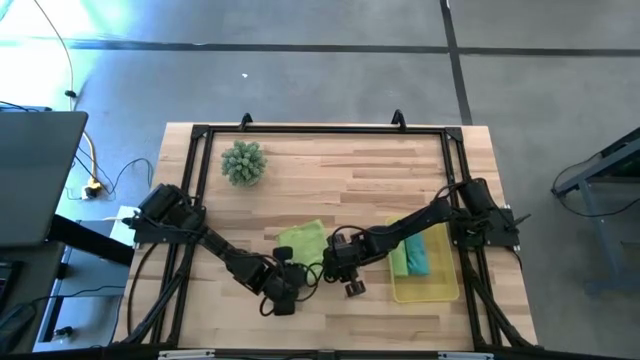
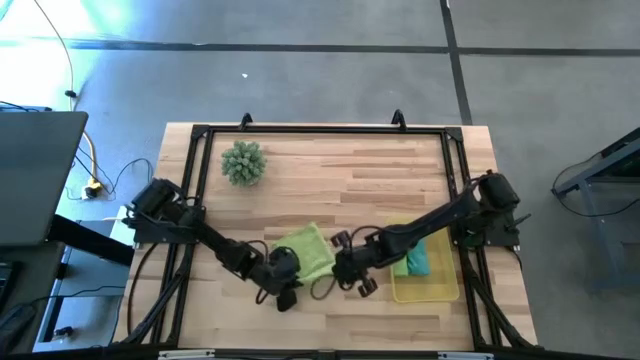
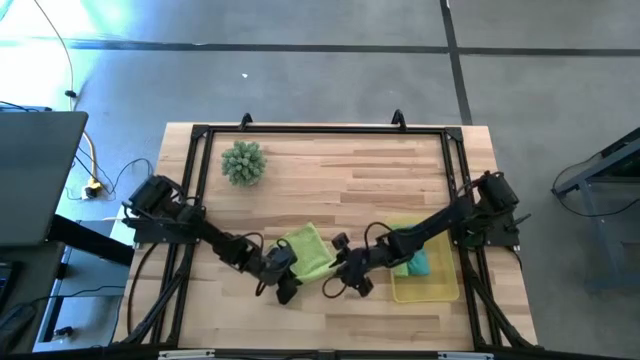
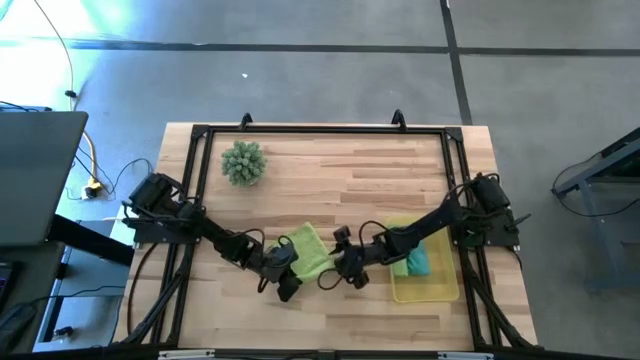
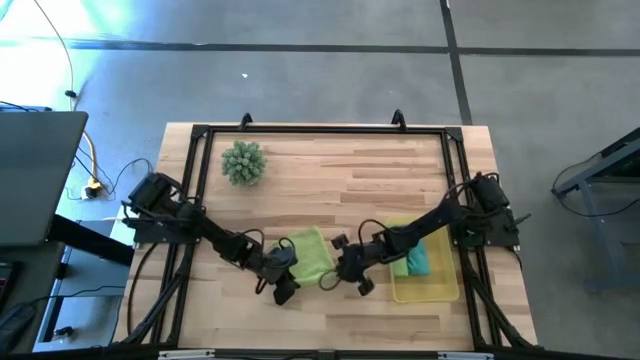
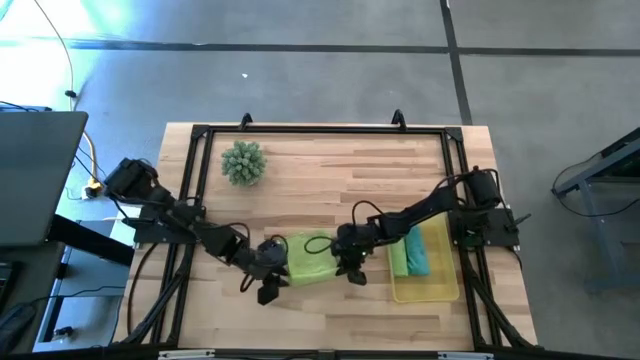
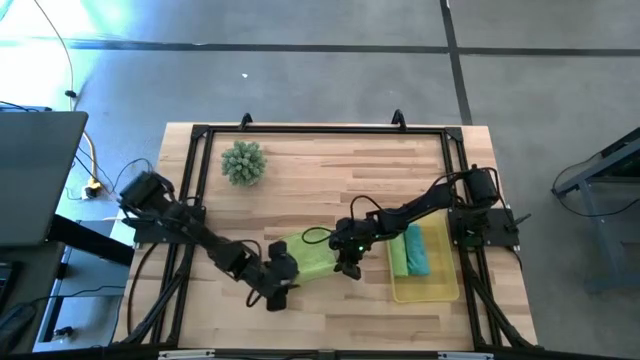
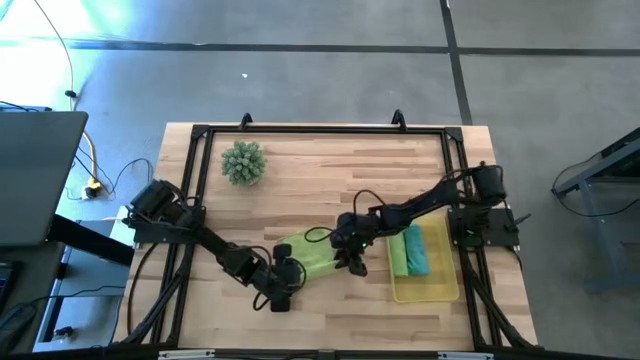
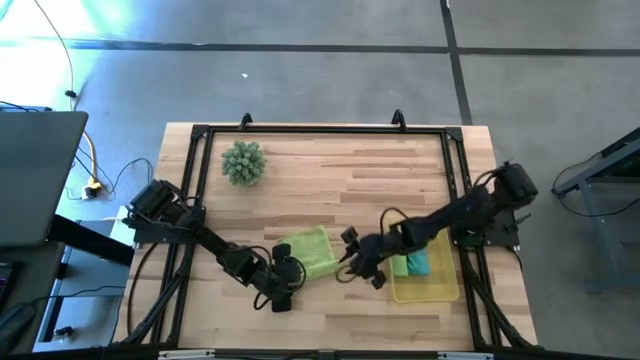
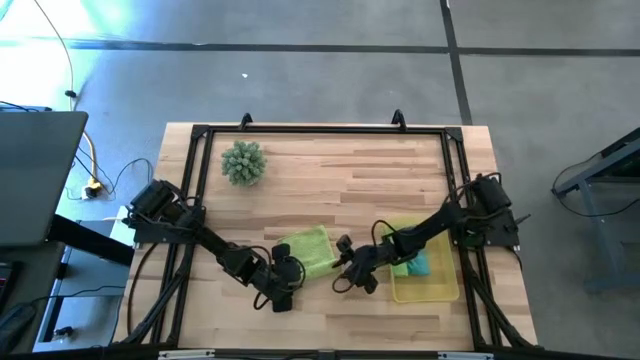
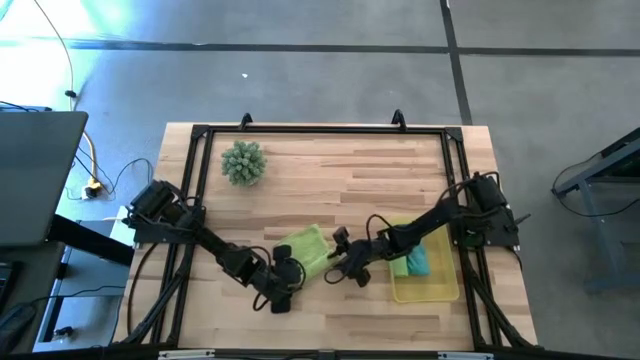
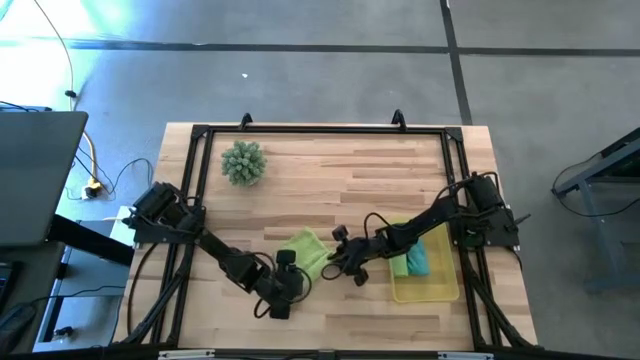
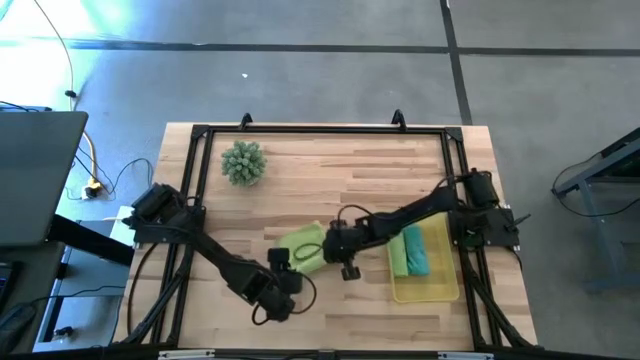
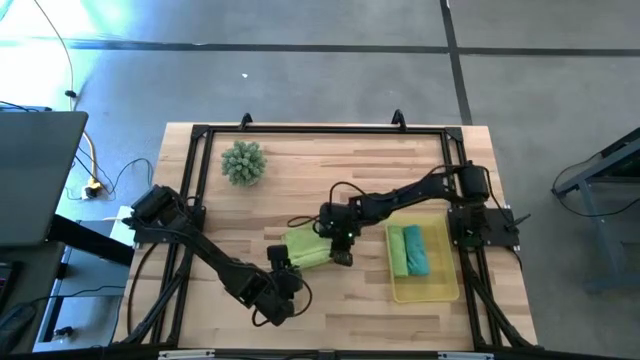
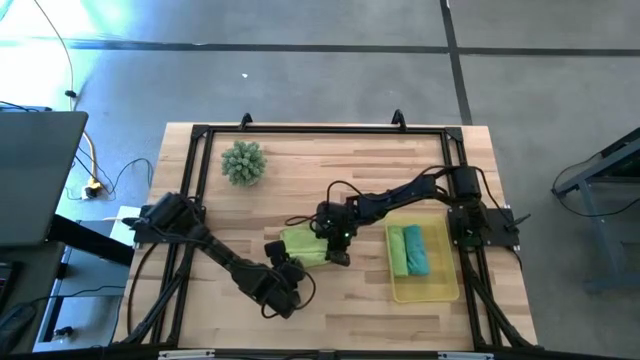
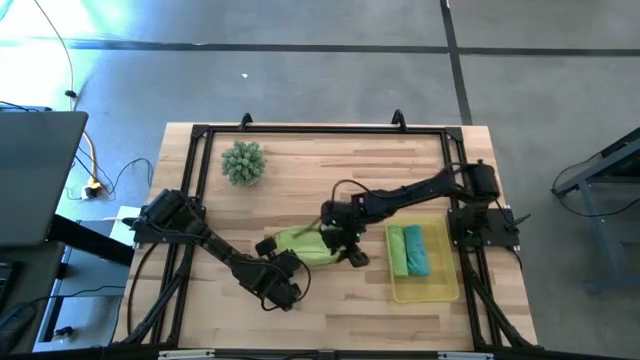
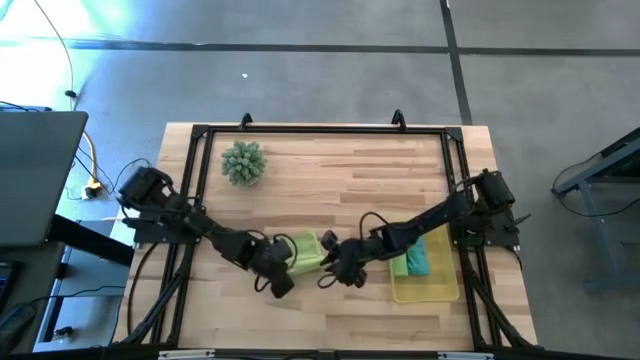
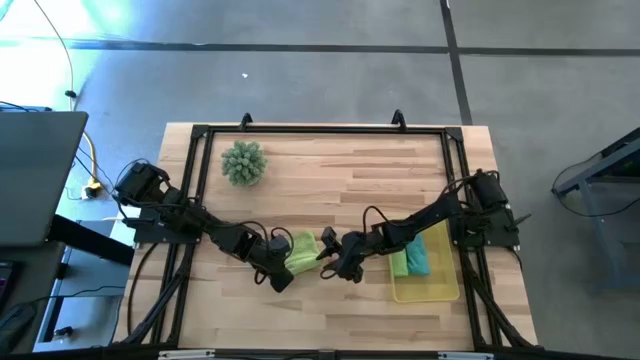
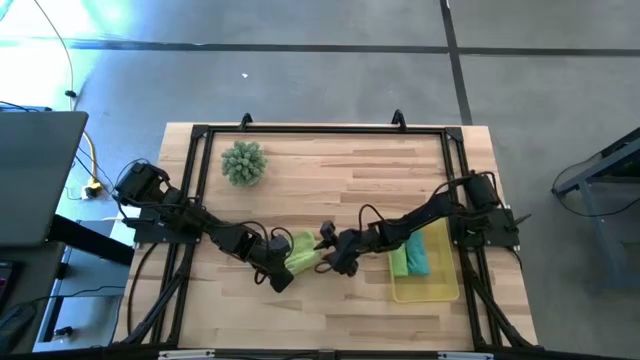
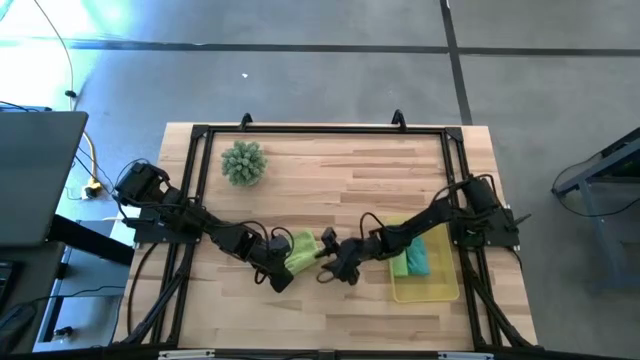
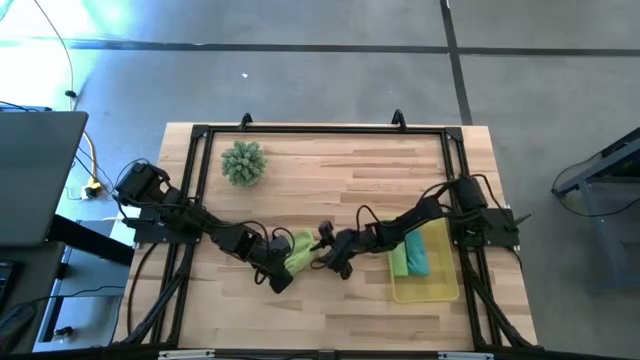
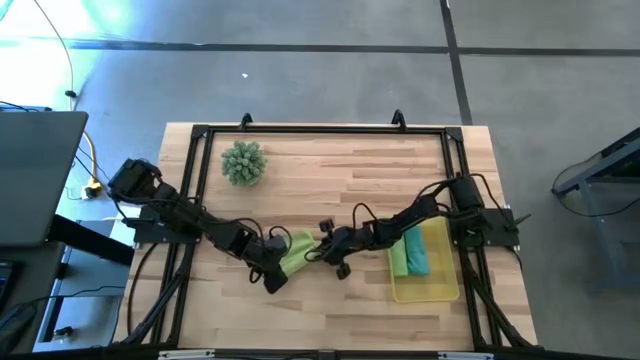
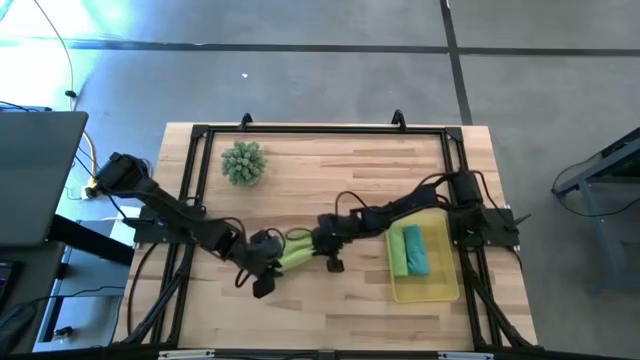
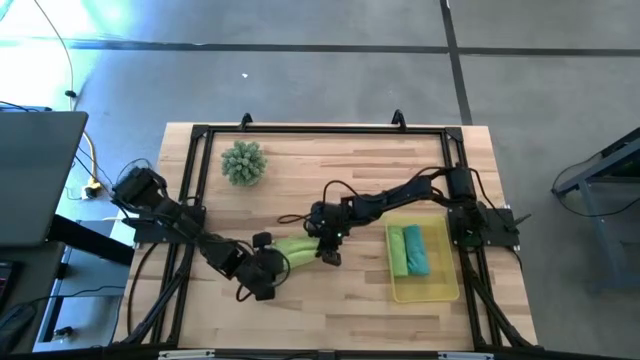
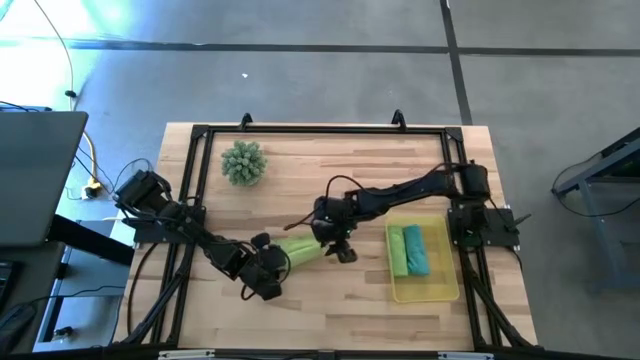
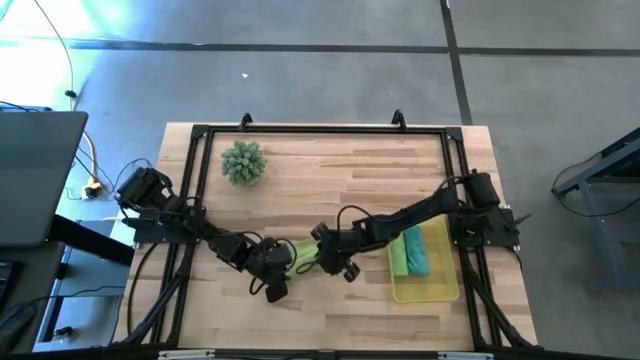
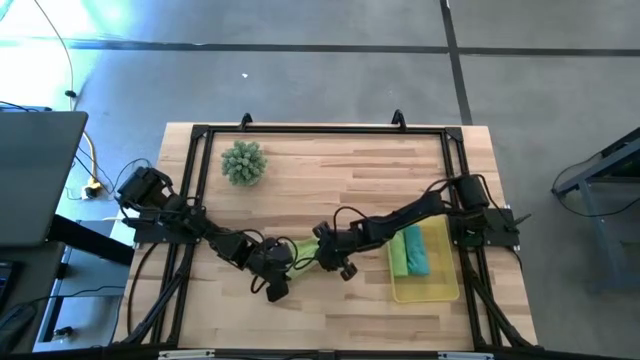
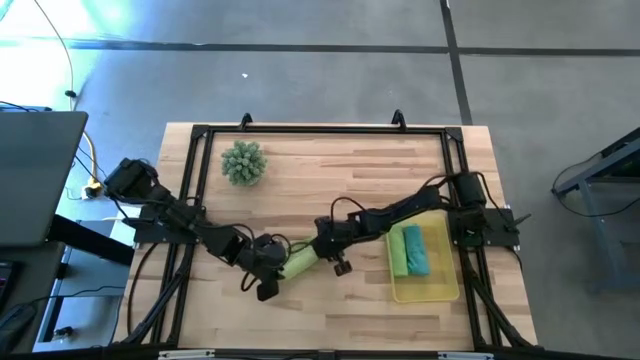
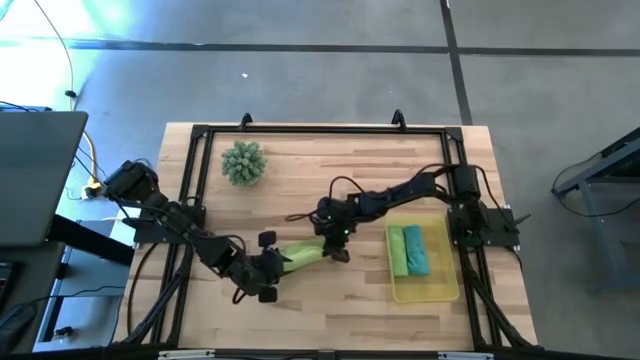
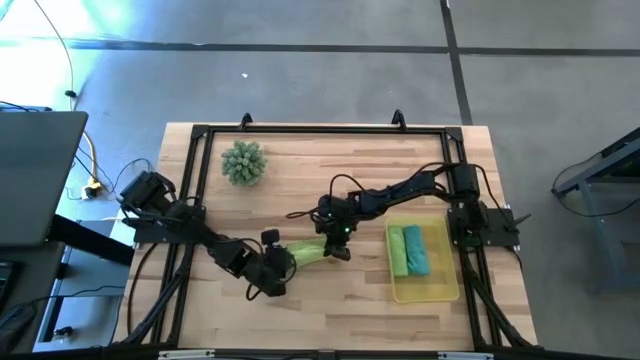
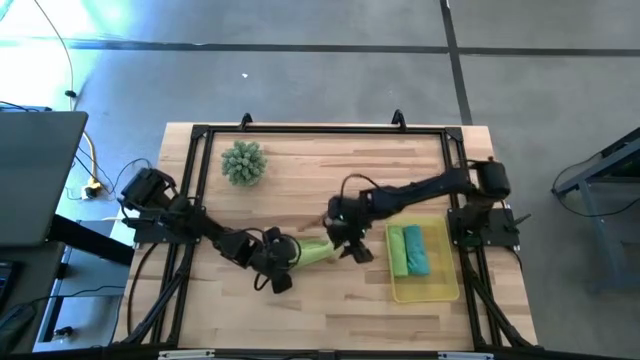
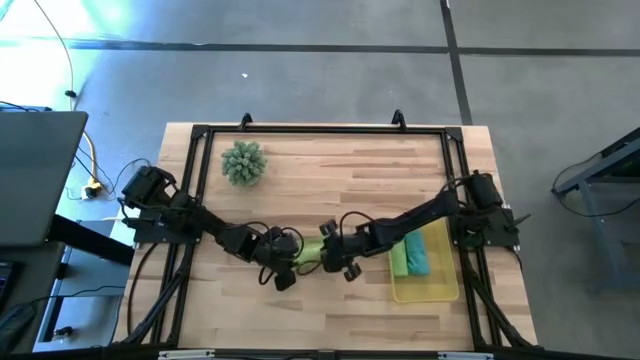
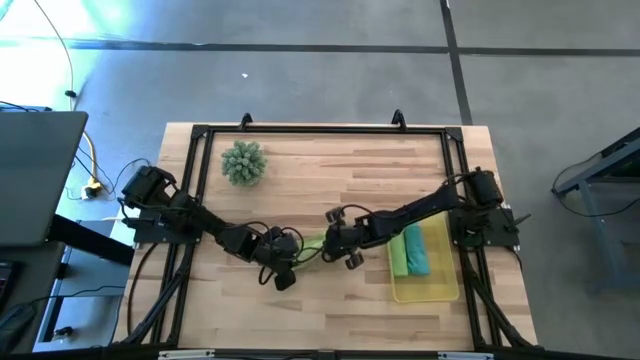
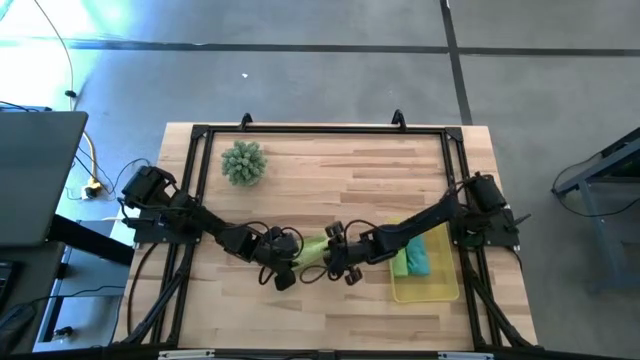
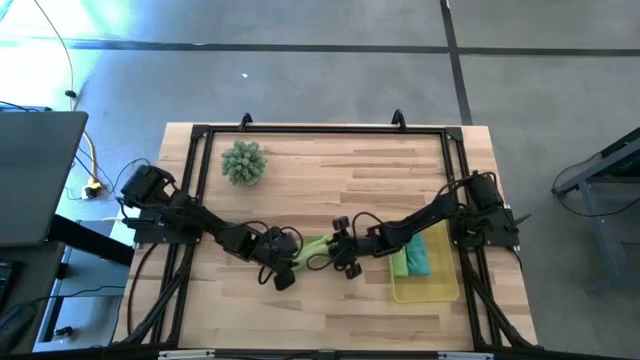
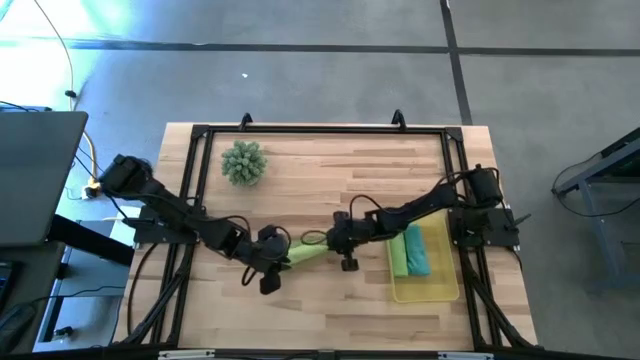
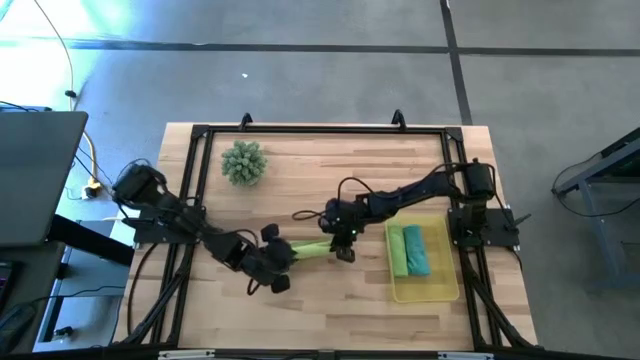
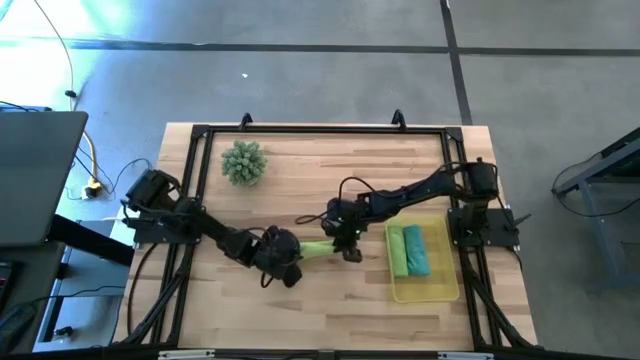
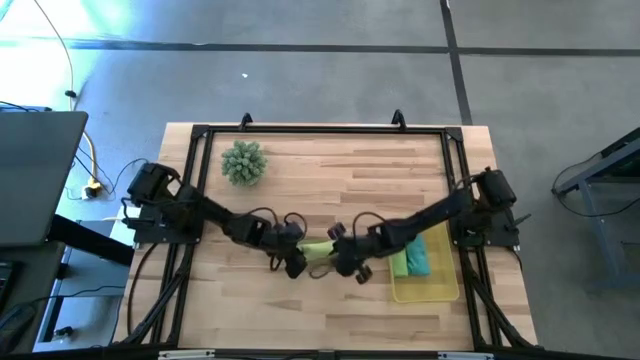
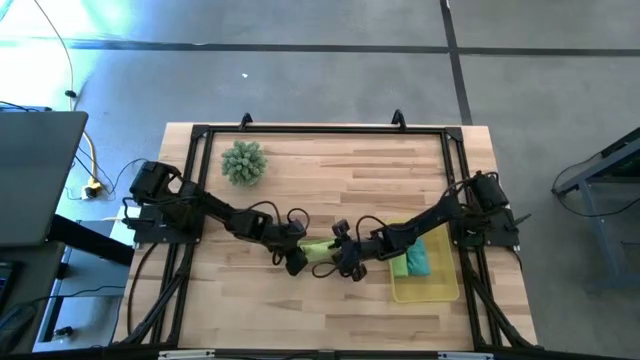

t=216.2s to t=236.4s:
Task: Roll microfiber towels into tight, uniform cylinder then place into a basket
Roll the light green cloth
